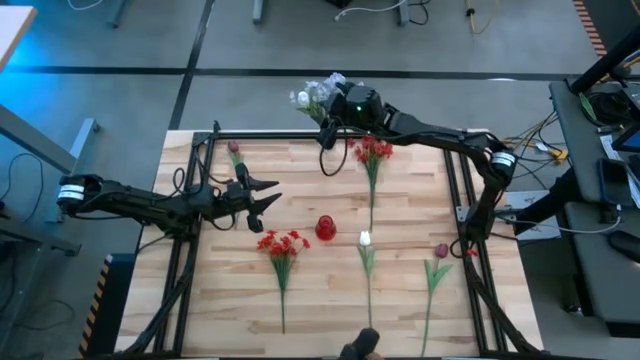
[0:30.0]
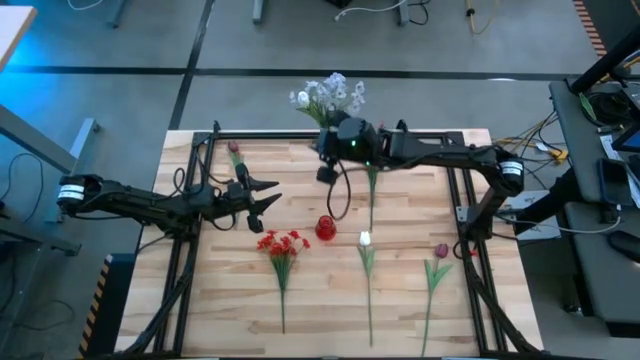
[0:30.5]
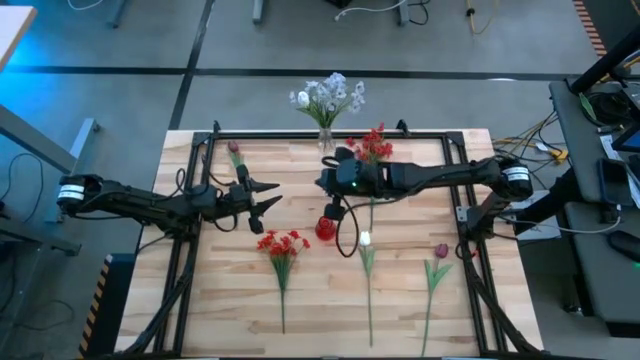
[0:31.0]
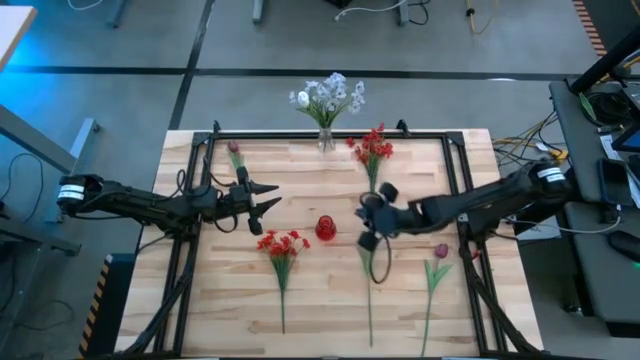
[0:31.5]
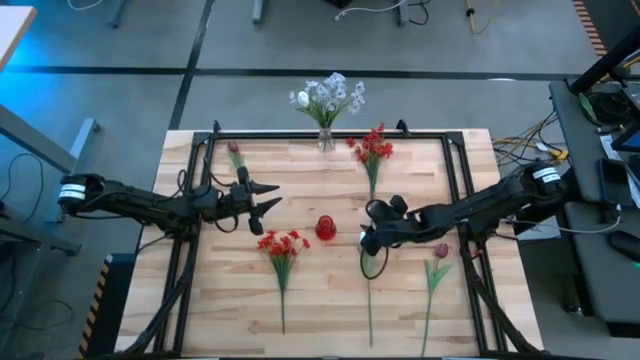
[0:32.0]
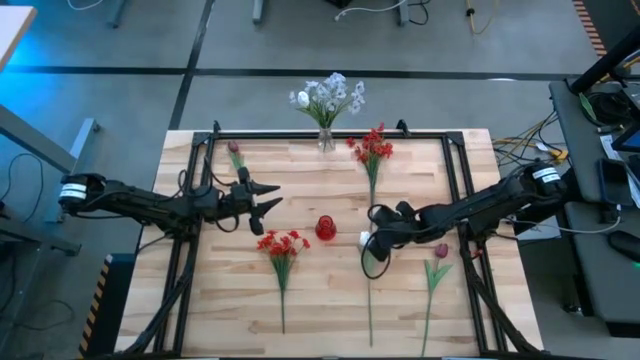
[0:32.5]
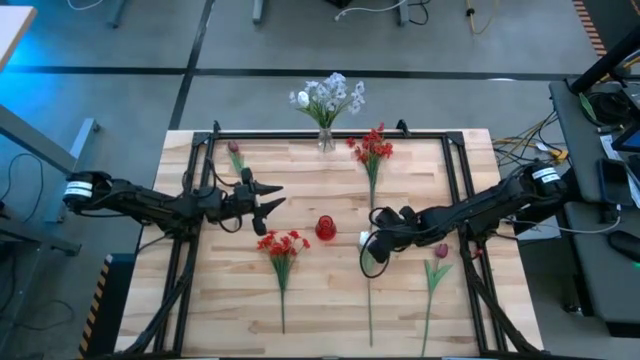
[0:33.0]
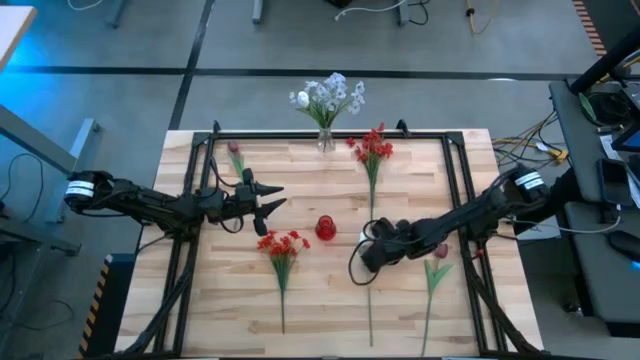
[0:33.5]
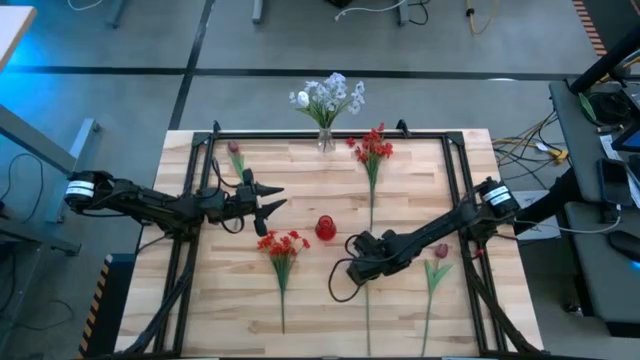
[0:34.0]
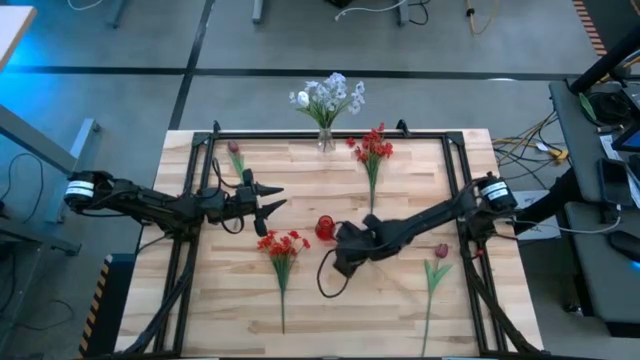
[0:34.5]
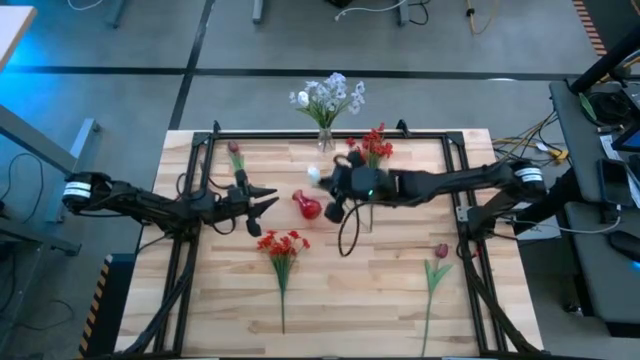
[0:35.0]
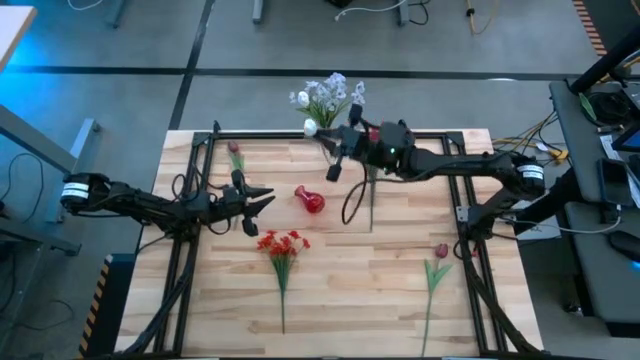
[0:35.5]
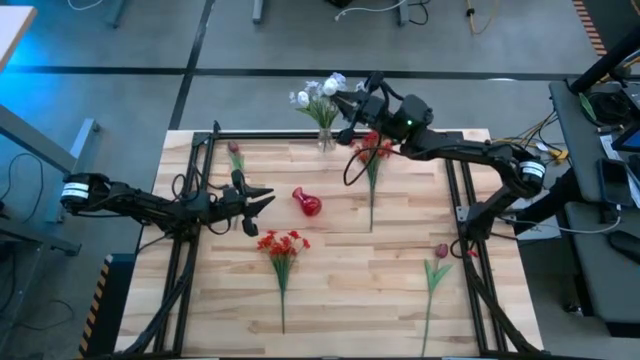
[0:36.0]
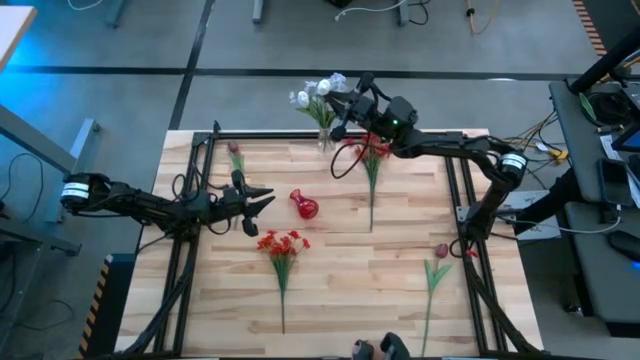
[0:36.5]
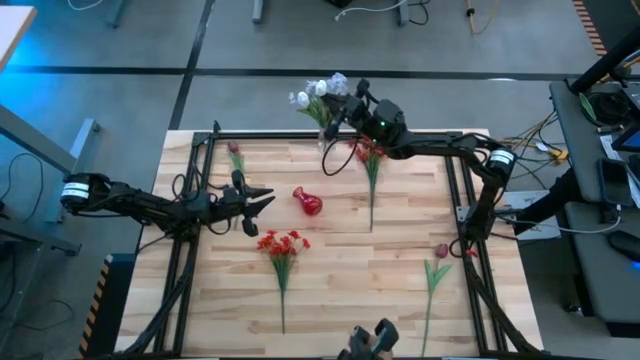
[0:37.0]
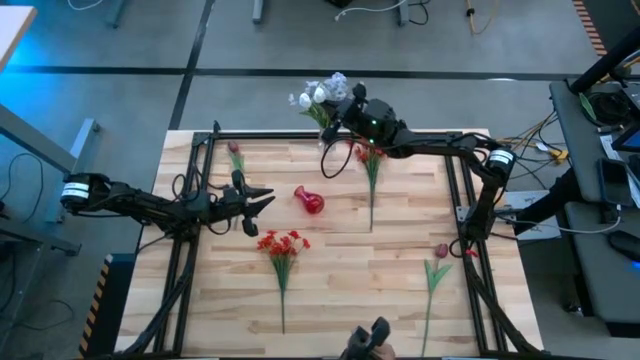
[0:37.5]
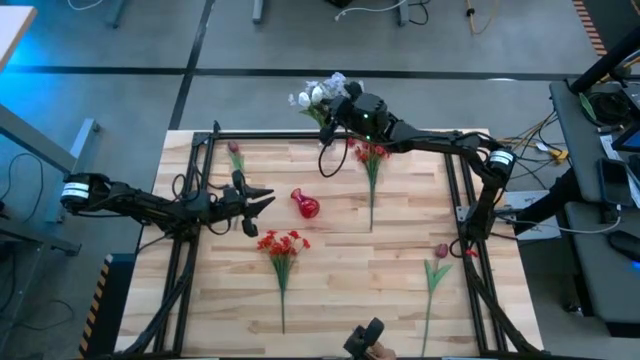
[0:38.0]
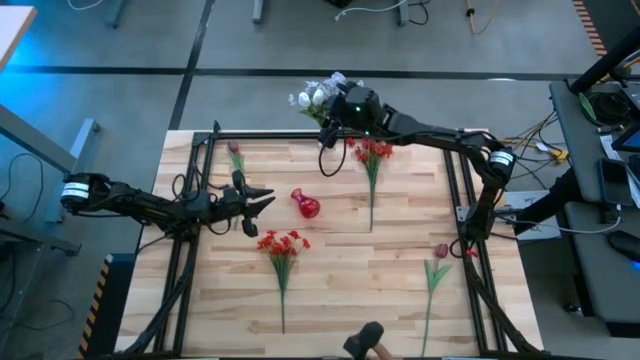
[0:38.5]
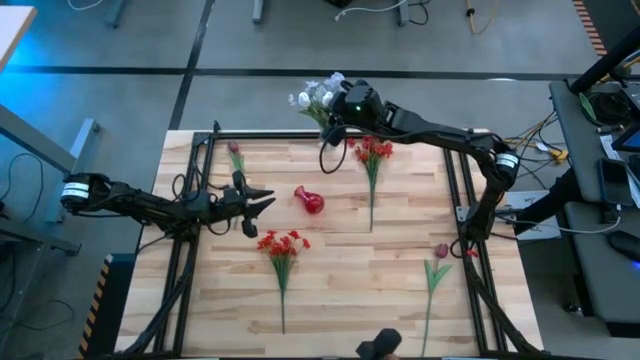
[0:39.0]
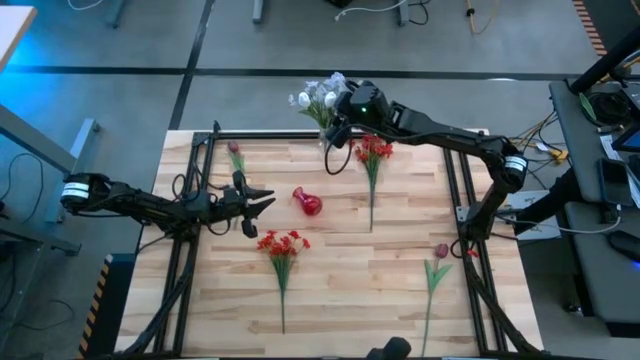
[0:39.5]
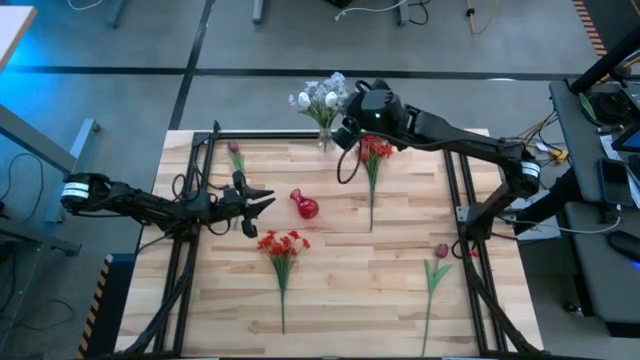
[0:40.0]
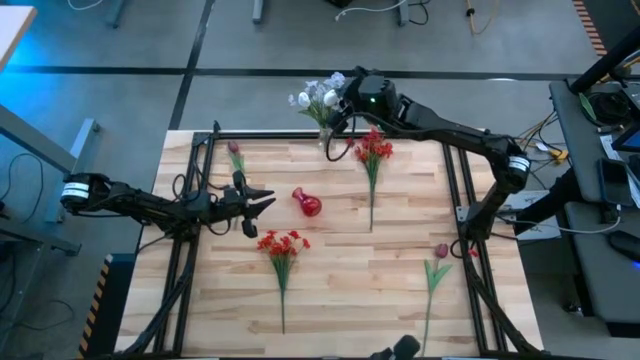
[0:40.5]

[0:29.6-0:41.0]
Task: Sort flowers into vase by color
Put the white tulip flower into the transparent vase

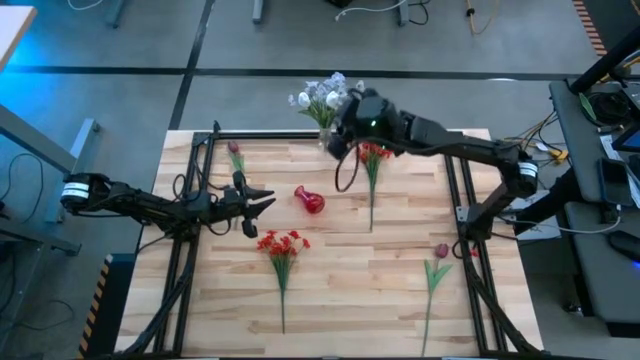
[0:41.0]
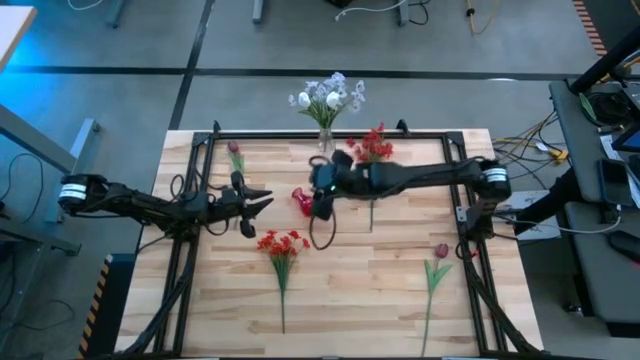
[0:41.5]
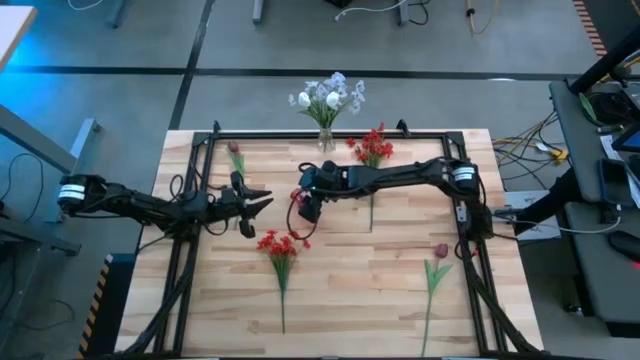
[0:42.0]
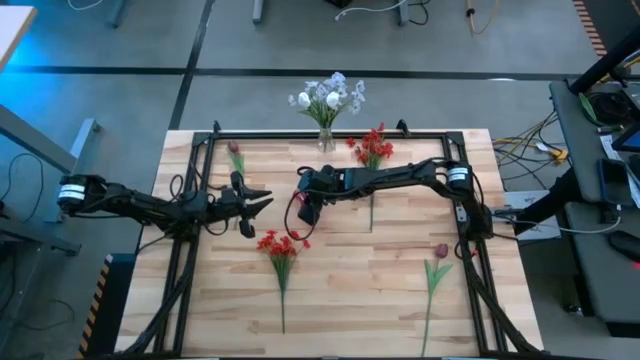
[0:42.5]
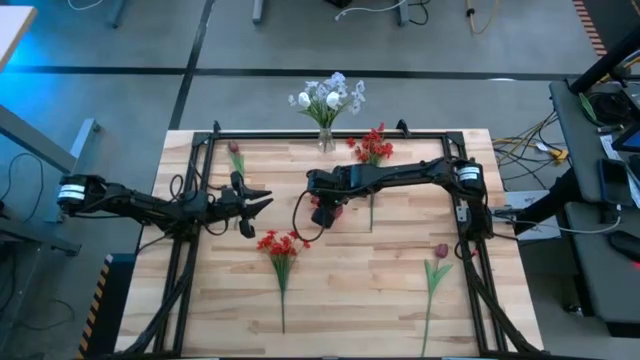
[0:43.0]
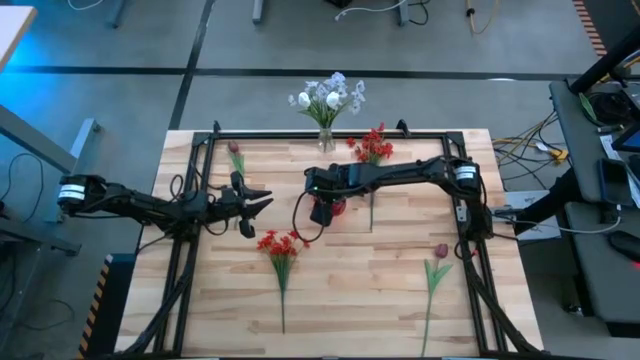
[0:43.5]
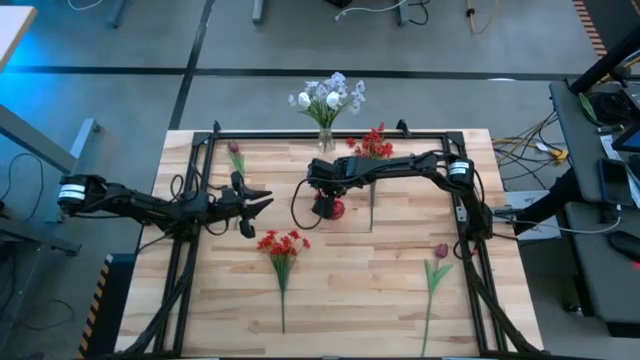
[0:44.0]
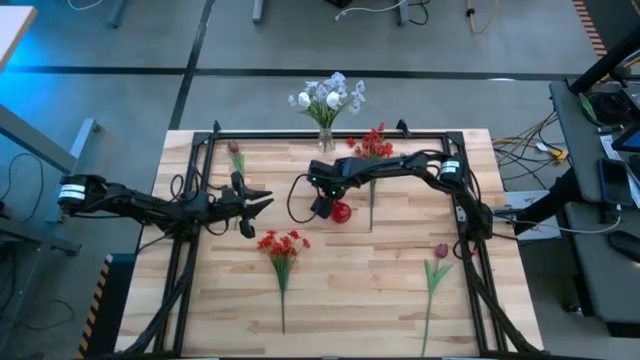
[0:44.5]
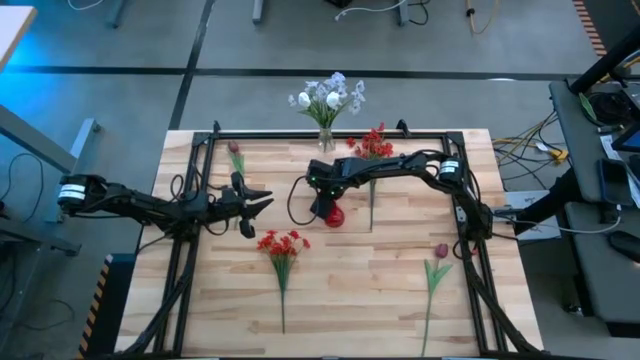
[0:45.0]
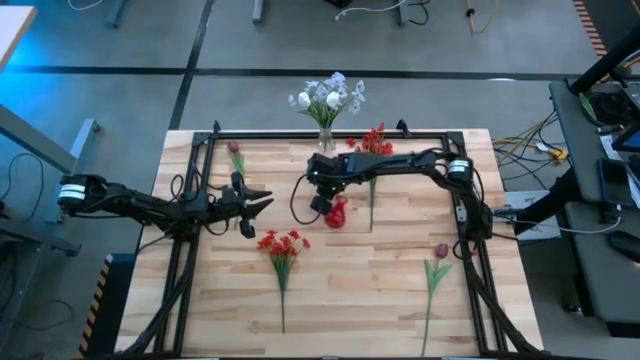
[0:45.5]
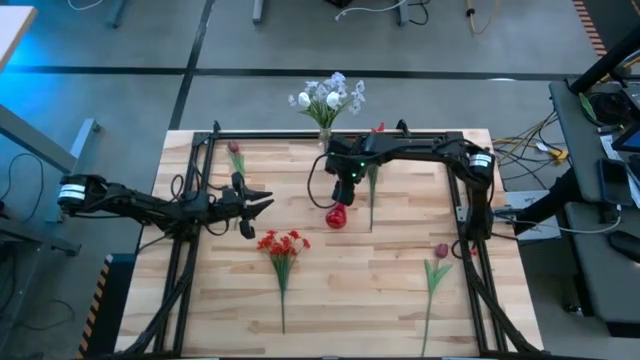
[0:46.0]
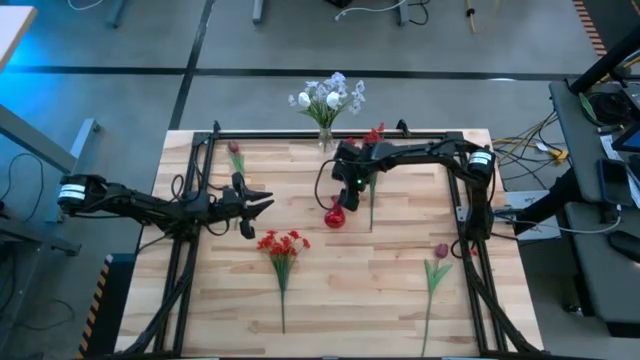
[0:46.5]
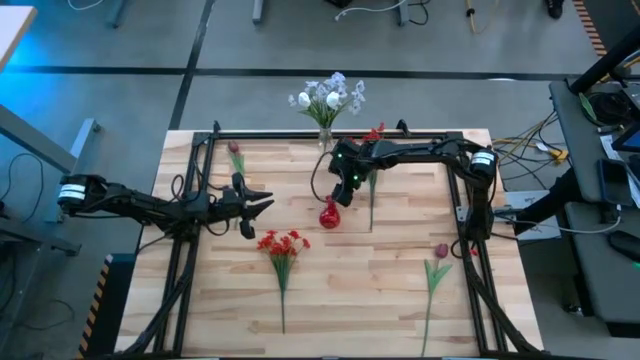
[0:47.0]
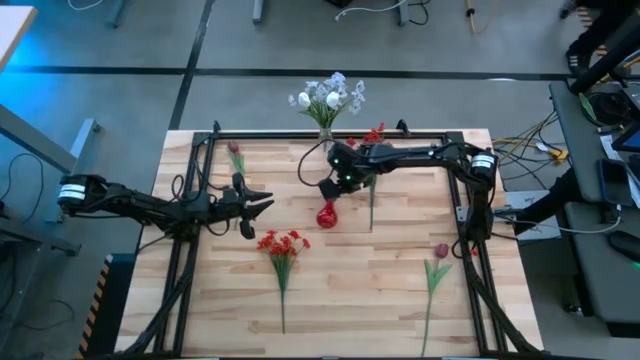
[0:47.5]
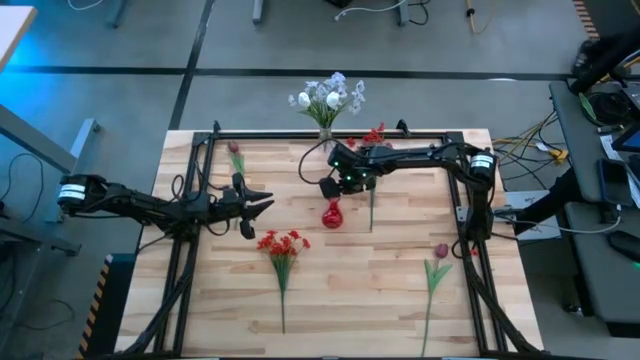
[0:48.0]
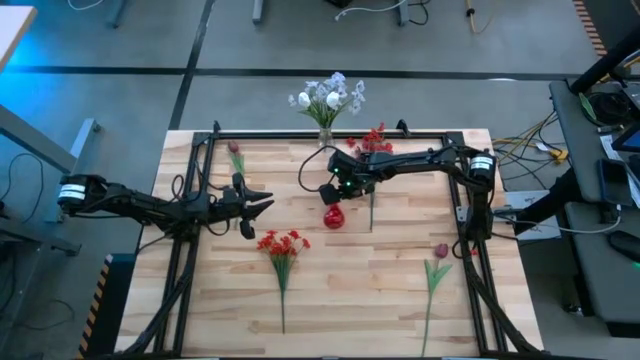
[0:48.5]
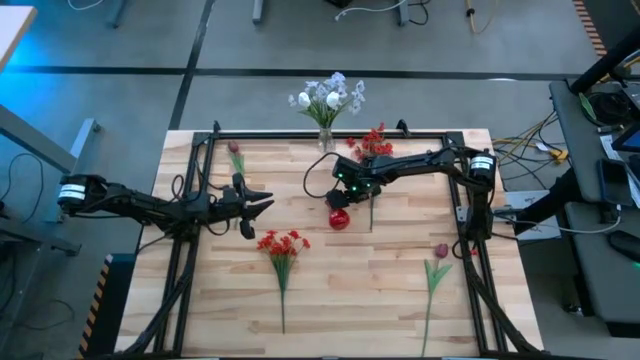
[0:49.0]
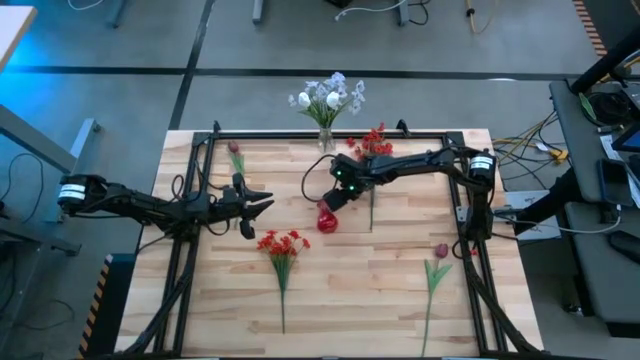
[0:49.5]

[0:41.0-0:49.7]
Adjust the red flower vase
